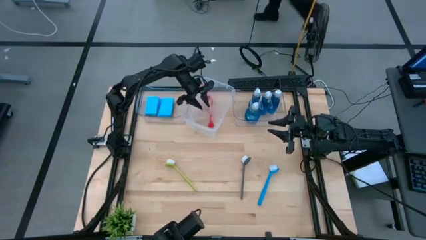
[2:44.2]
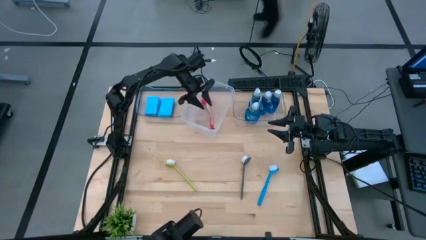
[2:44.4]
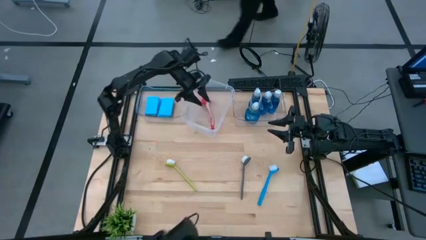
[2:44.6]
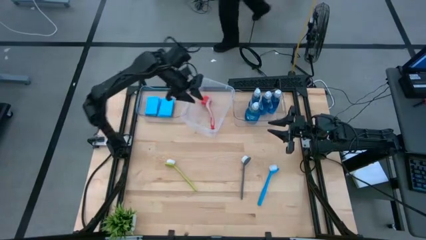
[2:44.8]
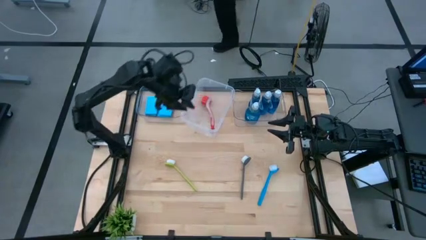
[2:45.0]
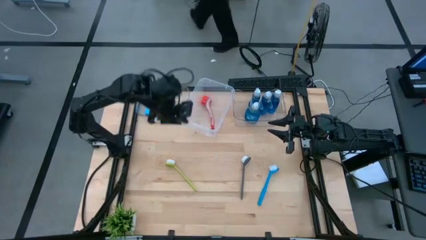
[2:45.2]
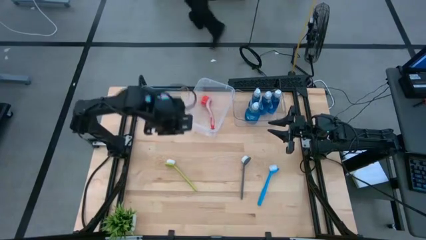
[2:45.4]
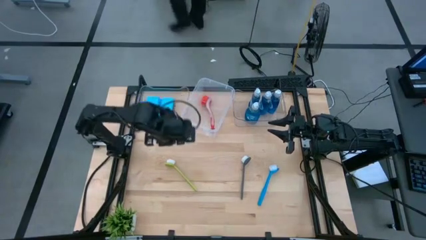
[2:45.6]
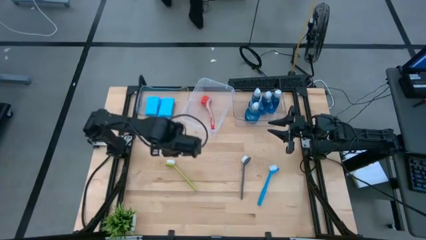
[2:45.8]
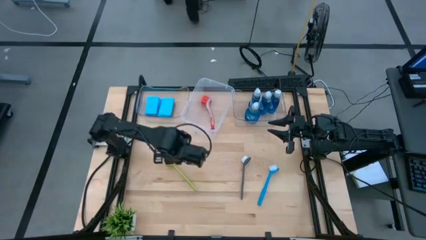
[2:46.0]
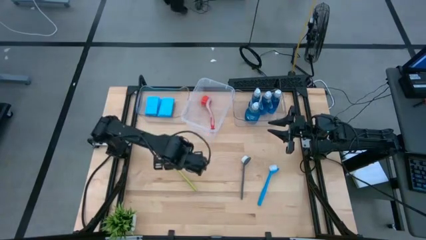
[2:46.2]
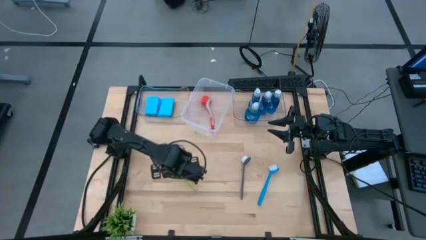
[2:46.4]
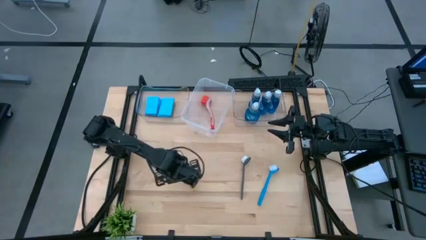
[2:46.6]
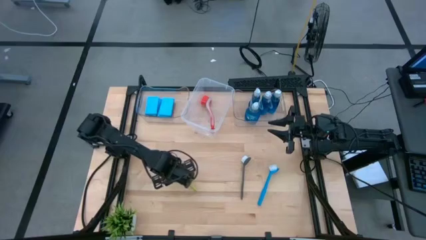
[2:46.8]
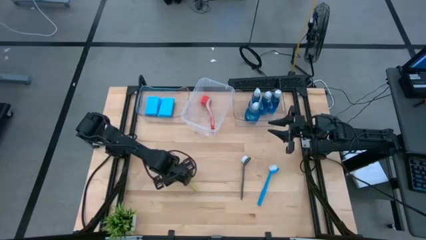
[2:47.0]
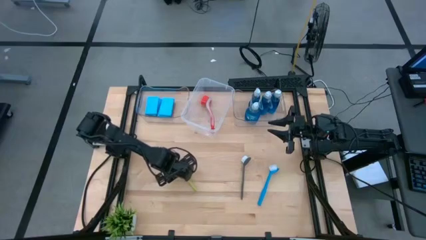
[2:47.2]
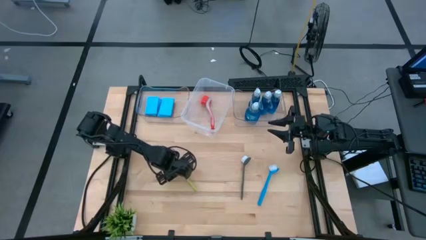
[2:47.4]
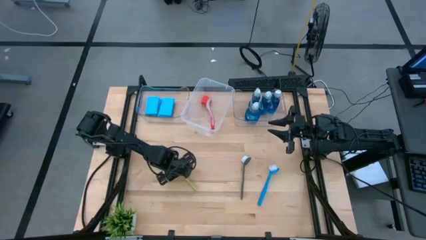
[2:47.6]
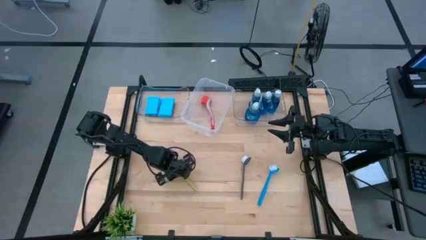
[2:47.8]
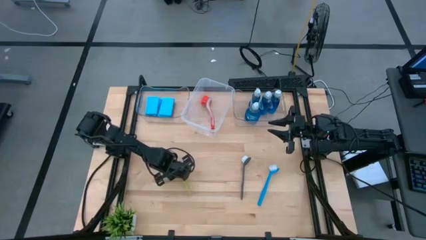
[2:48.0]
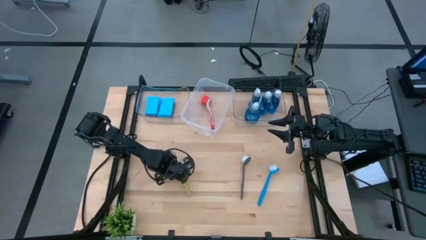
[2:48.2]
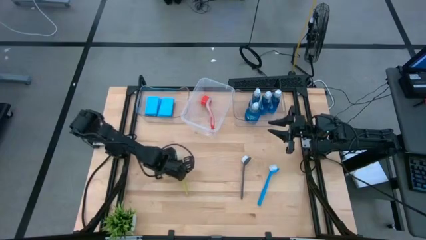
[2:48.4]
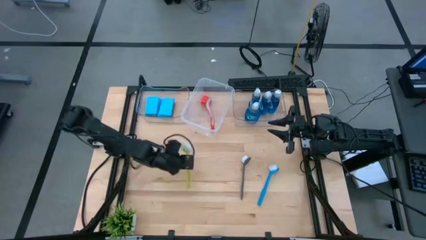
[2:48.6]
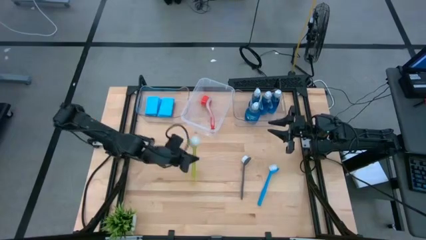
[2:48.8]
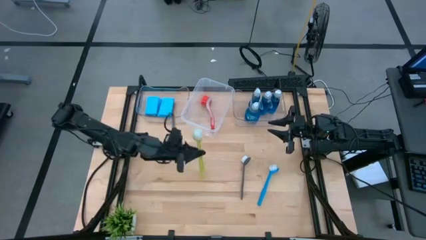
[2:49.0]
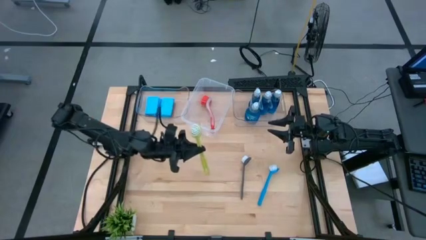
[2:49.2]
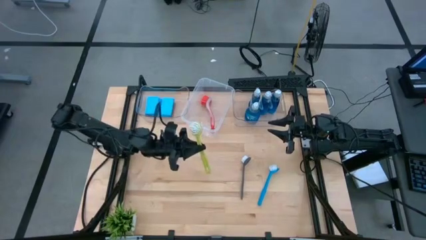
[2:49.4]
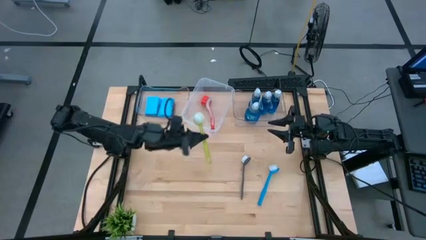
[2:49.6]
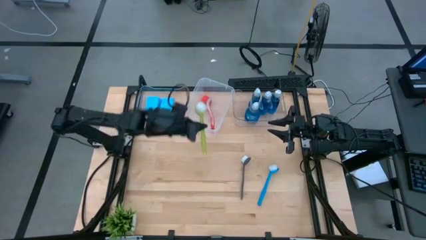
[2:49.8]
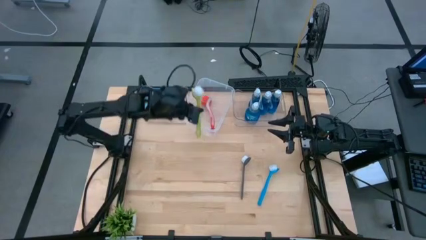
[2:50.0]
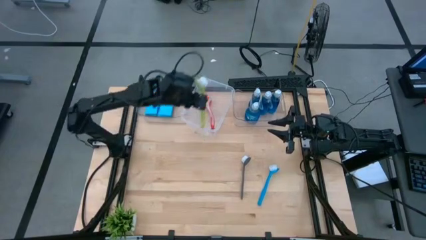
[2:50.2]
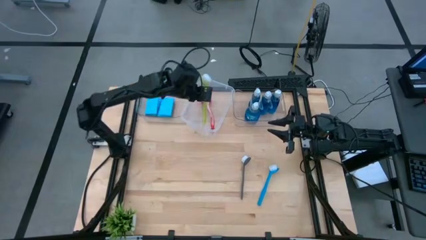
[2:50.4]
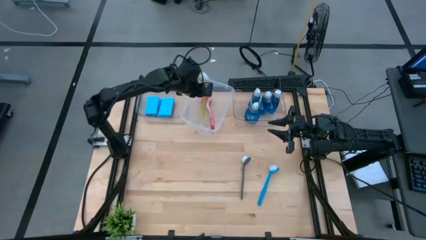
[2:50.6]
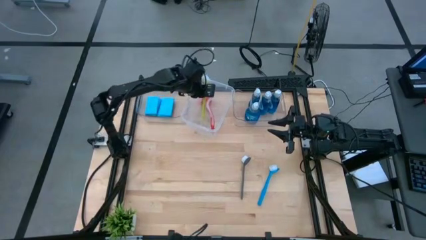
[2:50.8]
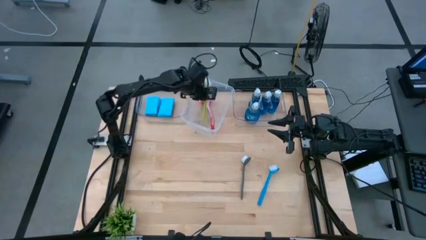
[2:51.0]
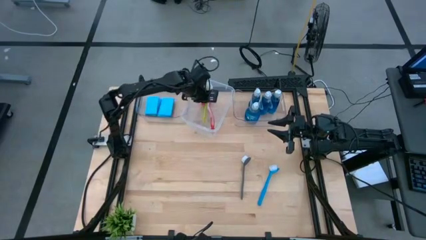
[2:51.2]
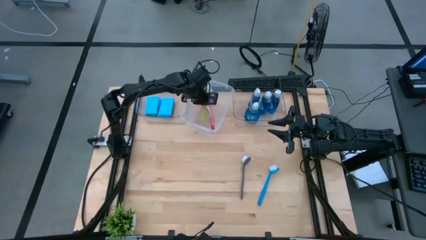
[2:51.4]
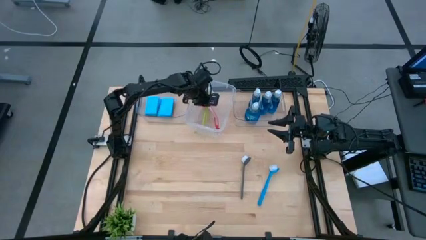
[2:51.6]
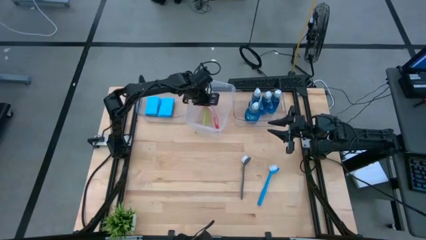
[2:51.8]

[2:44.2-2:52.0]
Task: Pick & Place Kitchen Sink Supplies
Put the yellow dish brush into the middle transparent bin

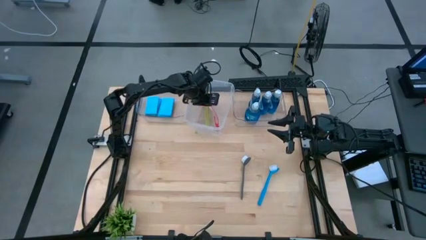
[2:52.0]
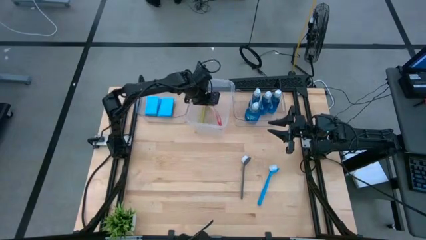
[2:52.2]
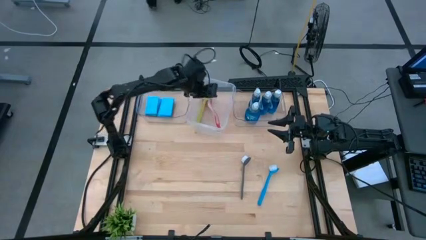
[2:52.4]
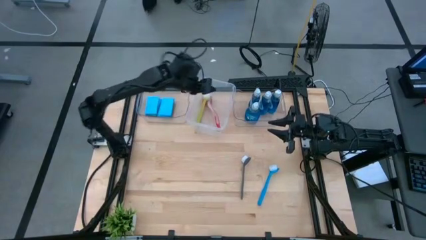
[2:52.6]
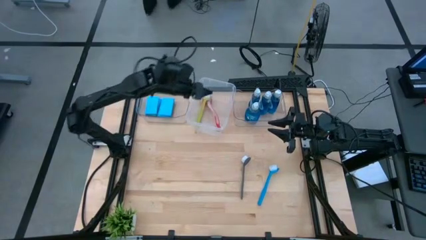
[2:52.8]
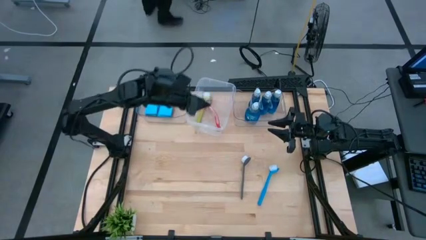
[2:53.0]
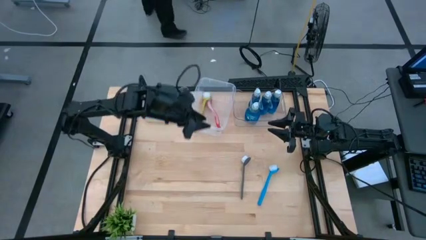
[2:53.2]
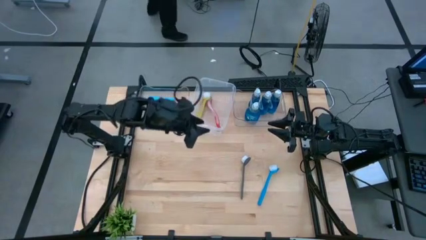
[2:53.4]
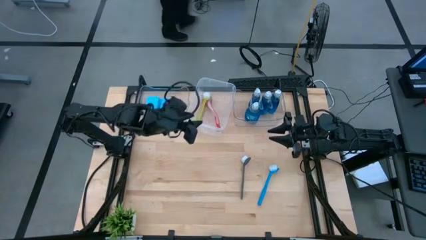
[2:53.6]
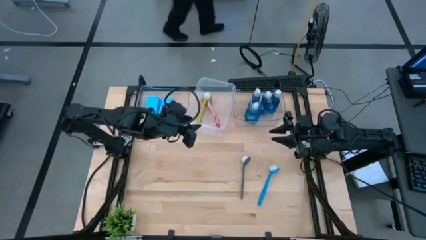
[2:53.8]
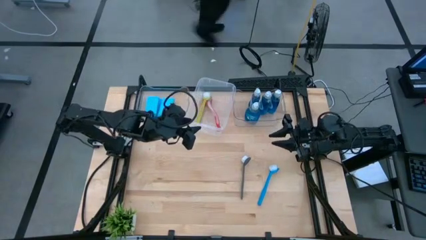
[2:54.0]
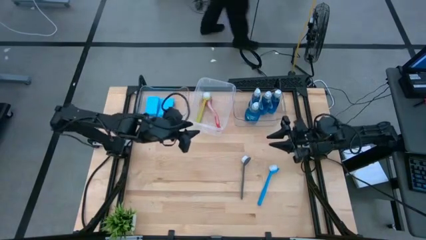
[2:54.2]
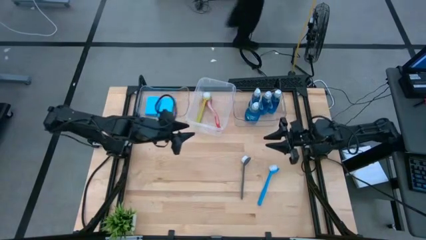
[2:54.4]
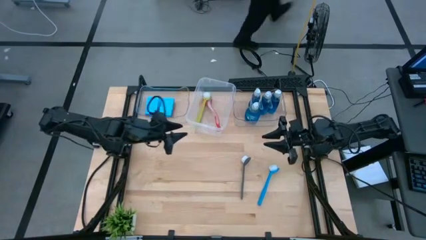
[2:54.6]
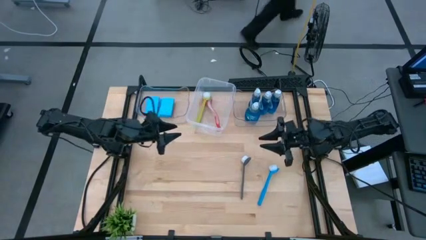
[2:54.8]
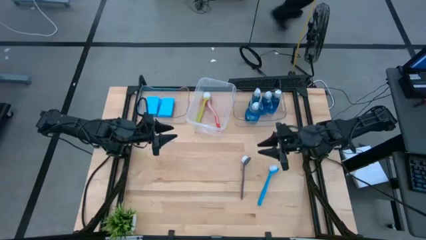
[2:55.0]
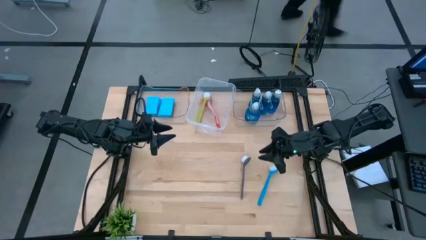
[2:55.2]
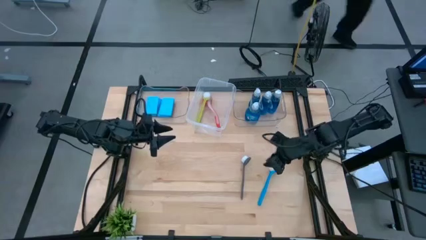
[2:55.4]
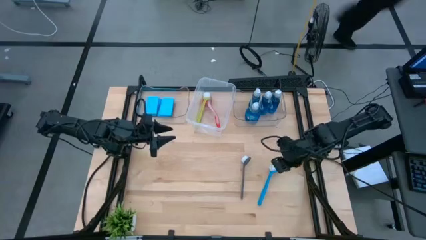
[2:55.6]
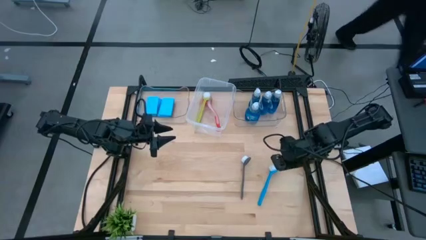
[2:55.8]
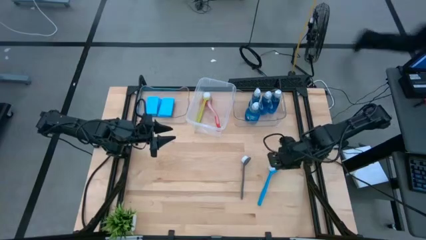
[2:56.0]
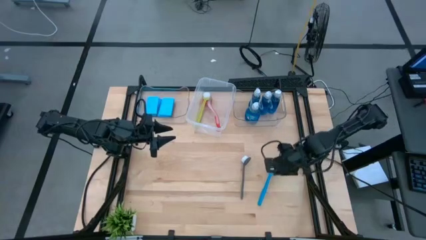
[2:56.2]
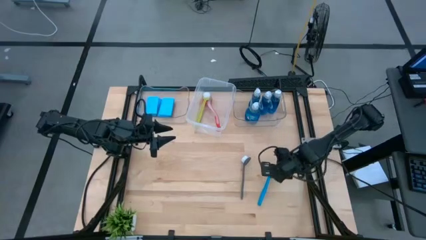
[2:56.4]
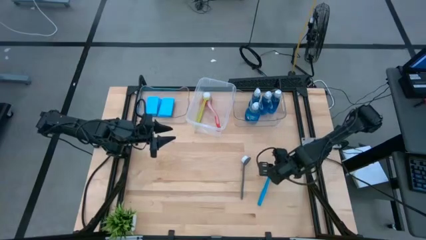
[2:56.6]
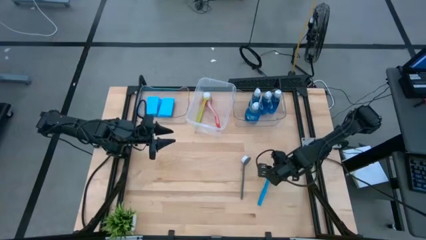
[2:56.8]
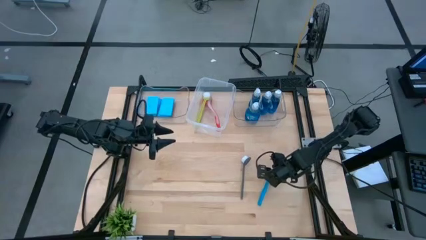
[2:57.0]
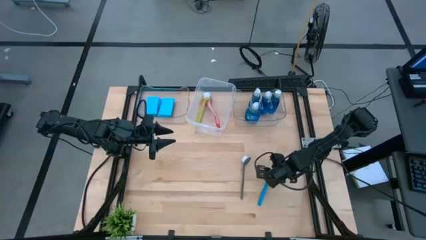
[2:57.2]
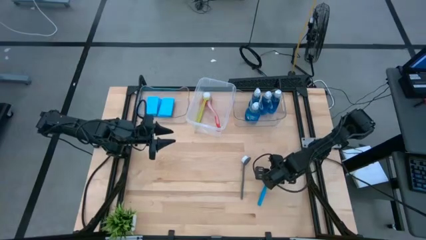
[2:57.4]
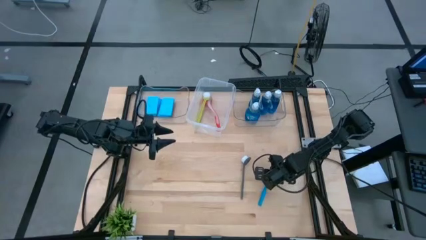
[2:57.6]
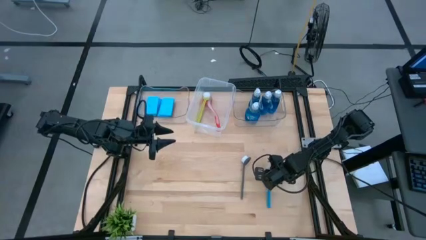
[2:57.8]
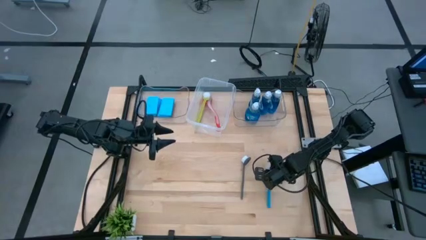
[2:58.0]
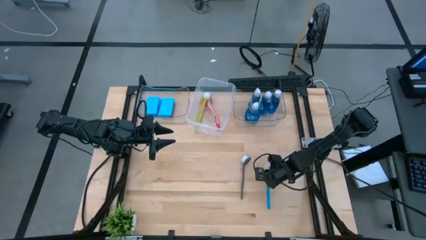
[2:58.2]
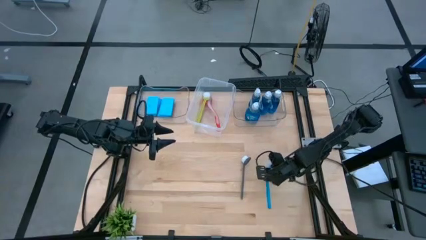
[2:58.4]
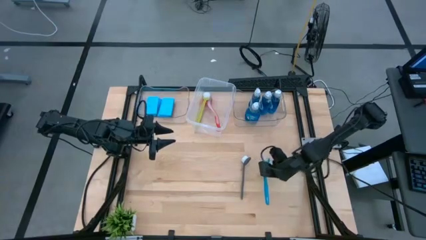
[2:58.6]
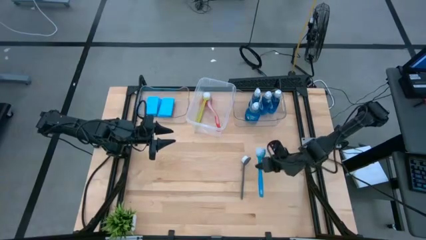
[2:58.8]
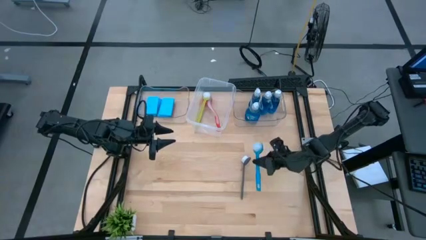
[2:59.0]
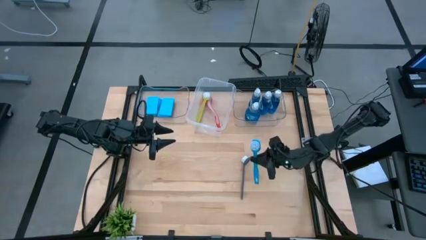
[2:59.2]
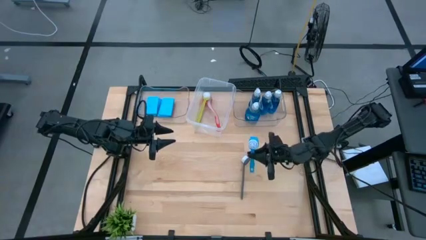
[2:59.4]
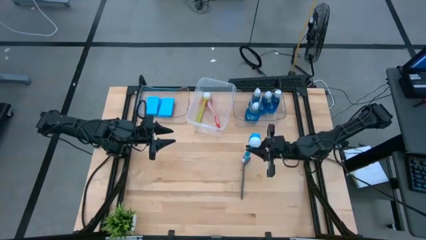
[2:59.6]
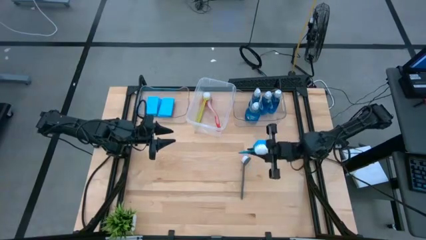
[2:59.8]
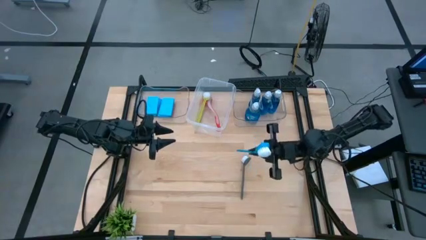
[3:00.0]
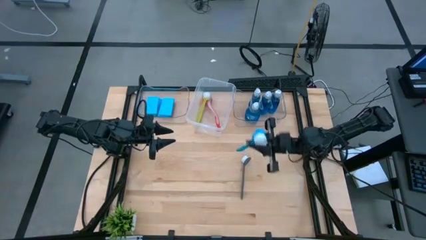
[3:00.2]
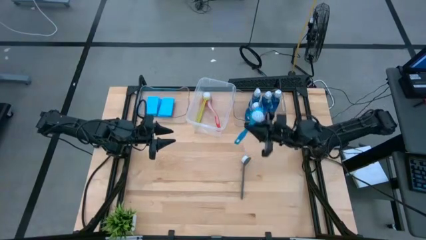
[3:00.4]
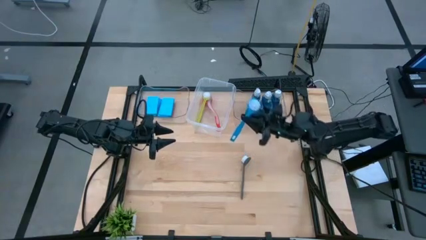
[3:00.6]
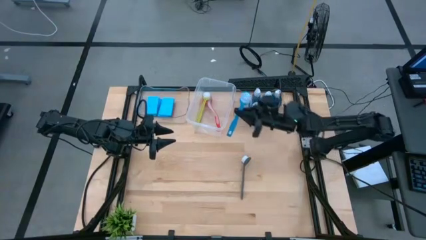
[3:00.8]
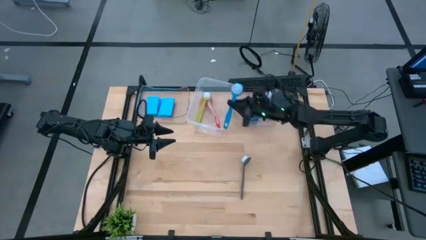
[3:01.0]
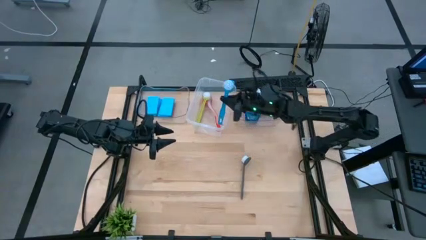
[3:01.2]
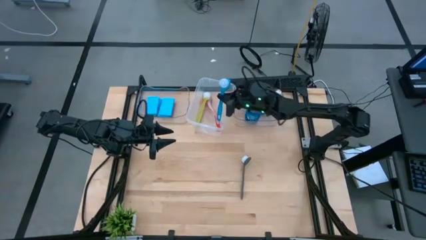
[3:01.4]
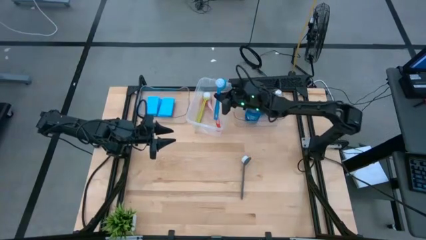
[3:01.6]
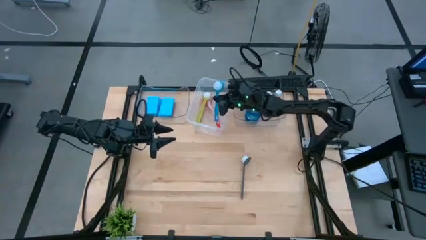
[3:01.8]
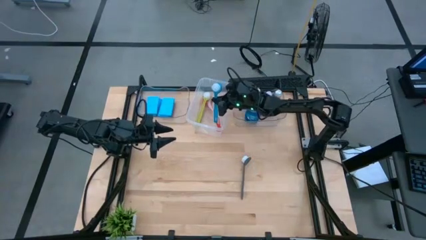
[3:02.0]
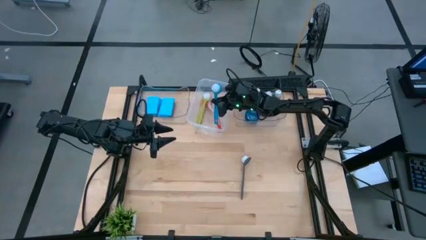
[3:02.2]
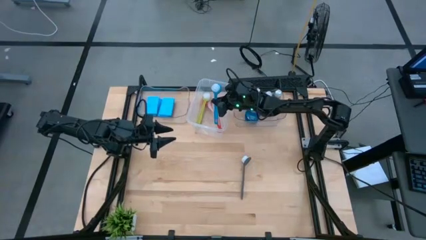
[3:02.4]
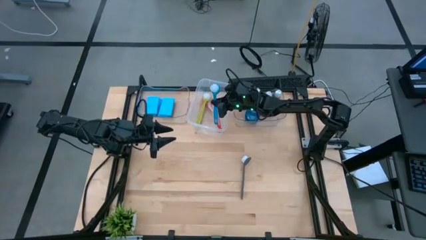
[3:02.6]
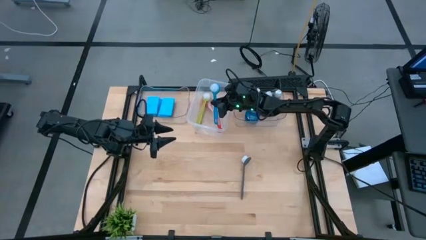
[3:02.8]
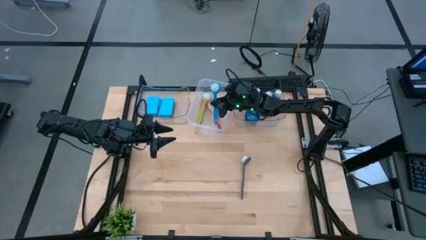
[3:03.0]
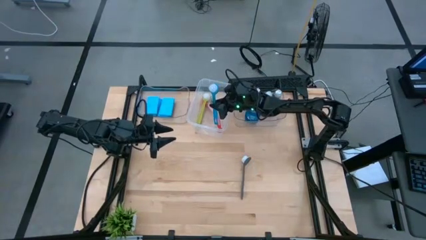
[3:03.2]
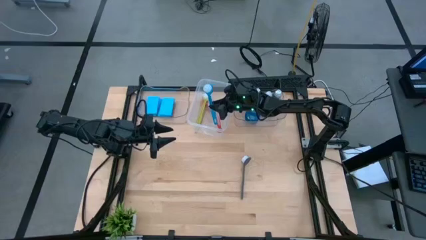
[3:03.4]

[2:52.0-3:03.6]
Put the blue dish brush into the middle transparent bin
